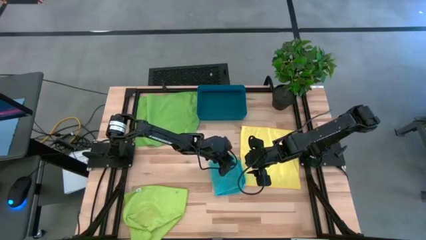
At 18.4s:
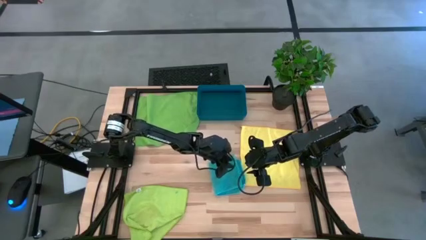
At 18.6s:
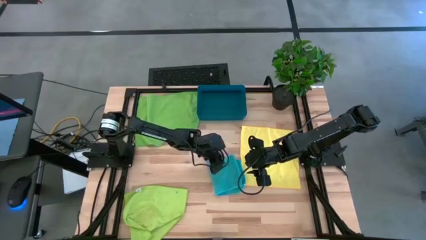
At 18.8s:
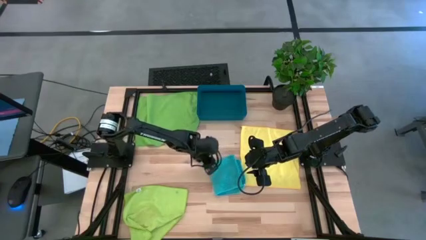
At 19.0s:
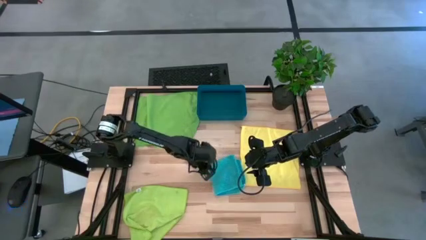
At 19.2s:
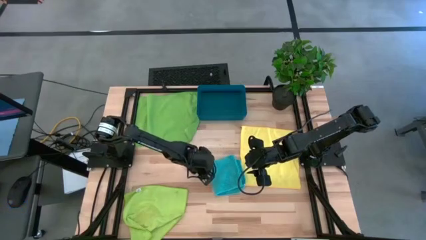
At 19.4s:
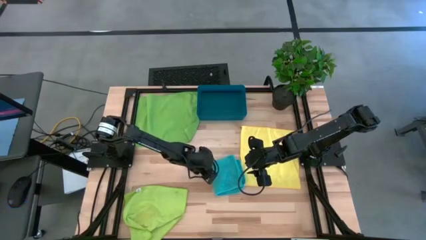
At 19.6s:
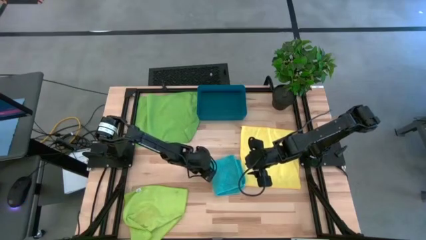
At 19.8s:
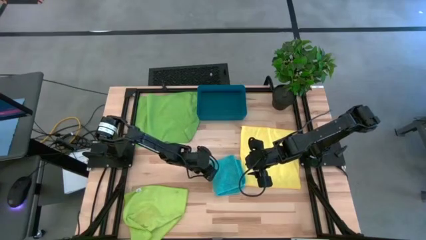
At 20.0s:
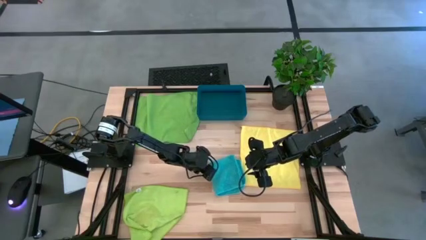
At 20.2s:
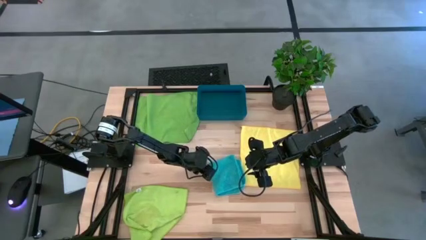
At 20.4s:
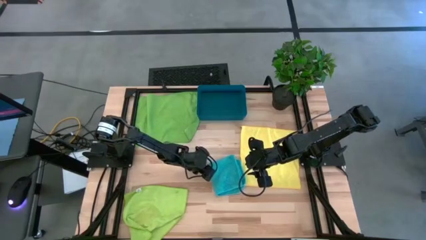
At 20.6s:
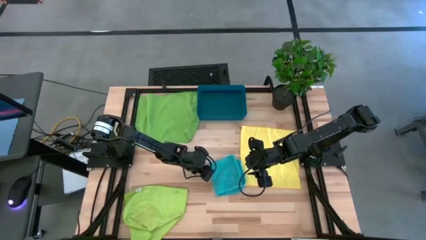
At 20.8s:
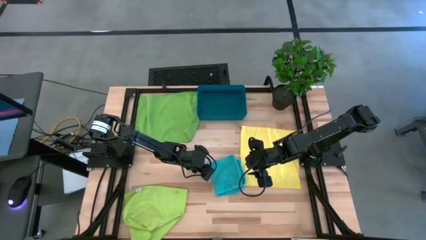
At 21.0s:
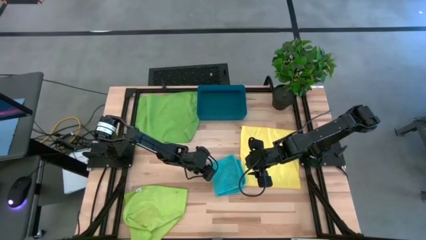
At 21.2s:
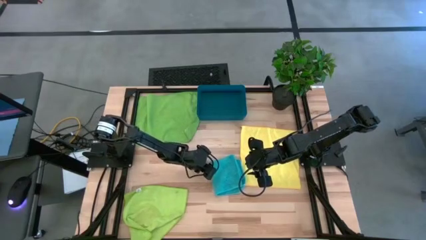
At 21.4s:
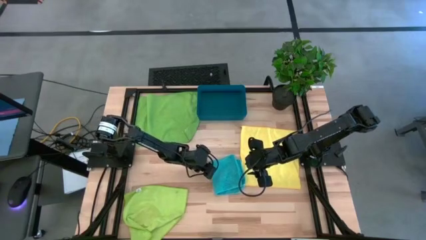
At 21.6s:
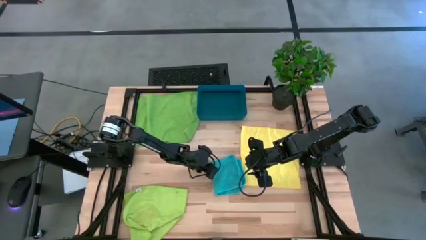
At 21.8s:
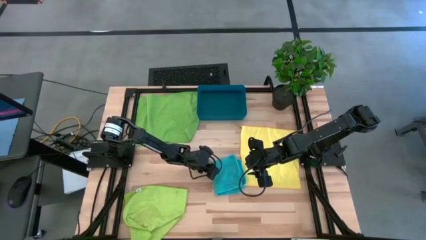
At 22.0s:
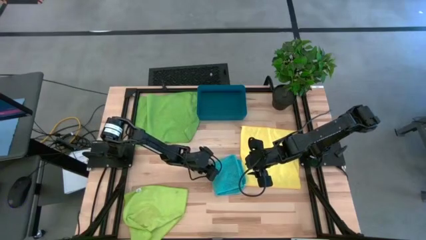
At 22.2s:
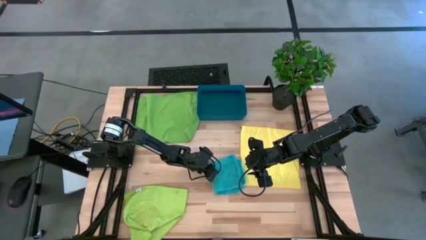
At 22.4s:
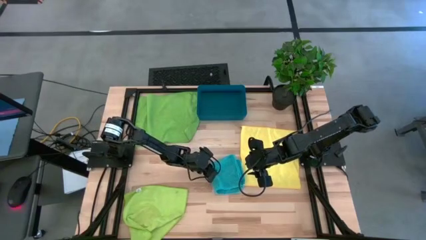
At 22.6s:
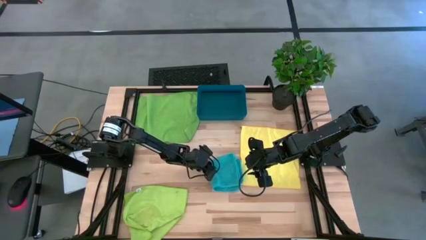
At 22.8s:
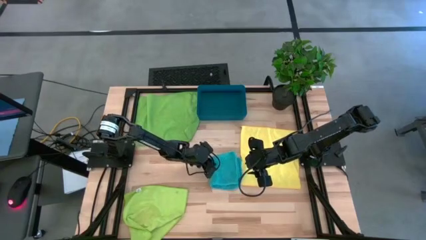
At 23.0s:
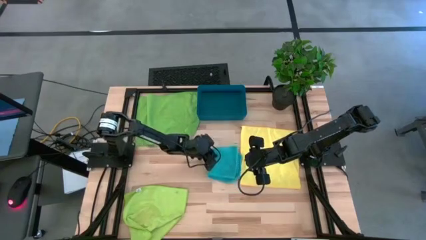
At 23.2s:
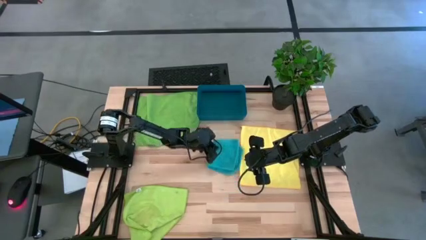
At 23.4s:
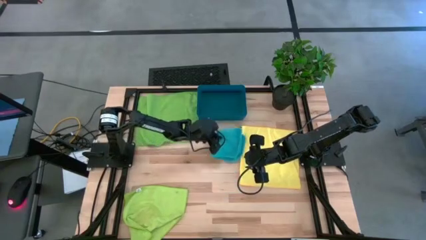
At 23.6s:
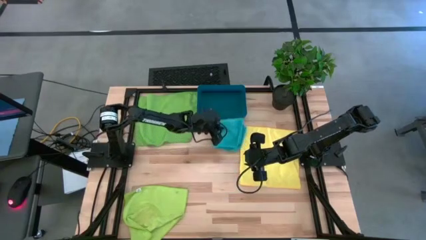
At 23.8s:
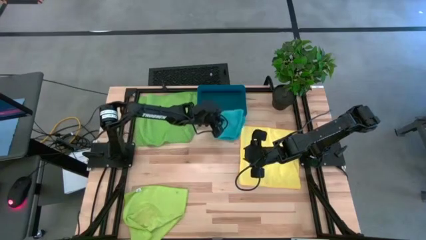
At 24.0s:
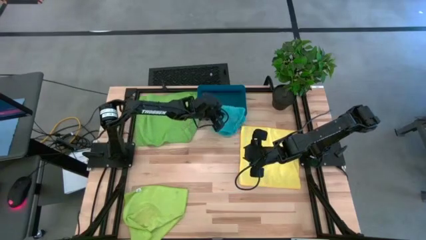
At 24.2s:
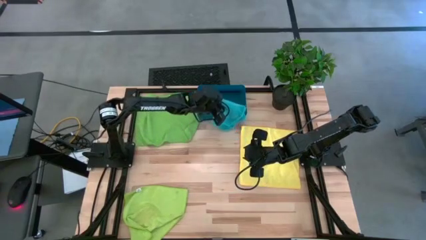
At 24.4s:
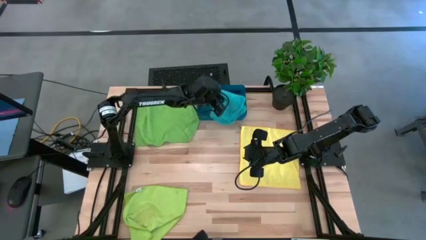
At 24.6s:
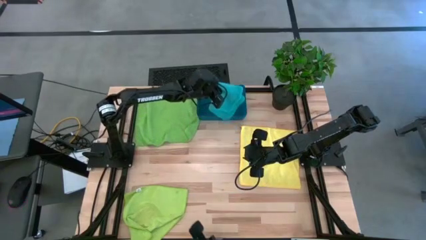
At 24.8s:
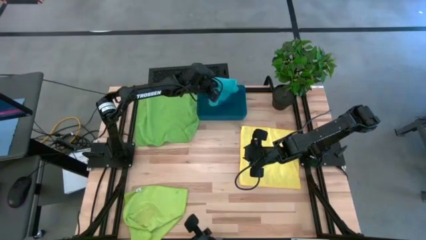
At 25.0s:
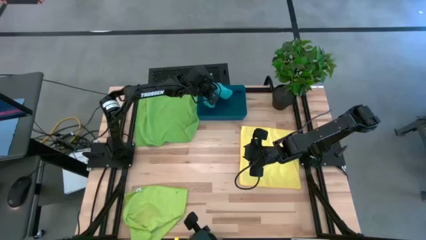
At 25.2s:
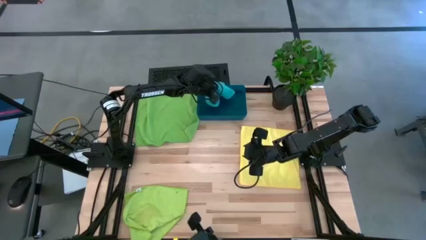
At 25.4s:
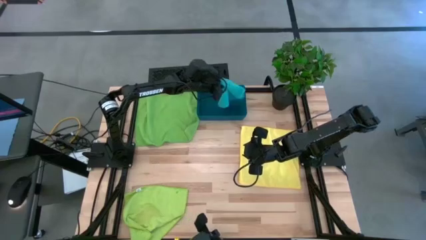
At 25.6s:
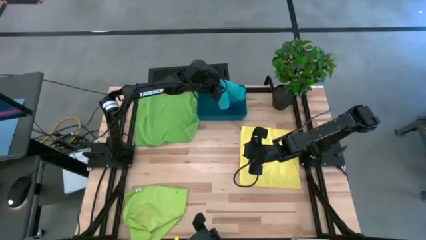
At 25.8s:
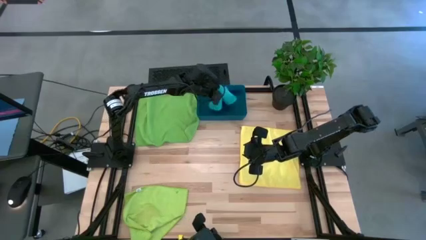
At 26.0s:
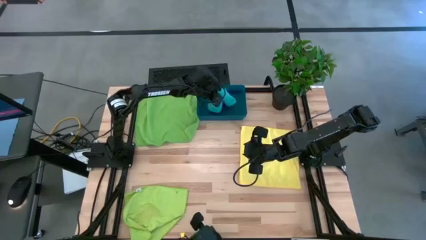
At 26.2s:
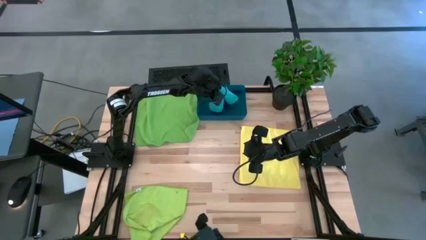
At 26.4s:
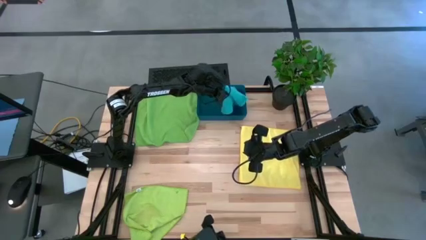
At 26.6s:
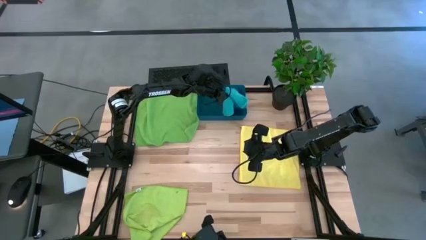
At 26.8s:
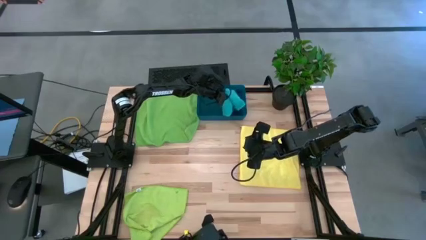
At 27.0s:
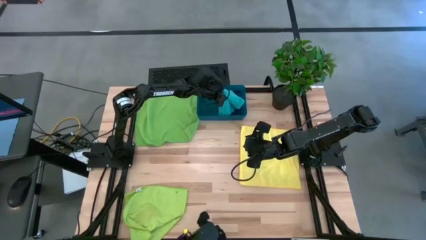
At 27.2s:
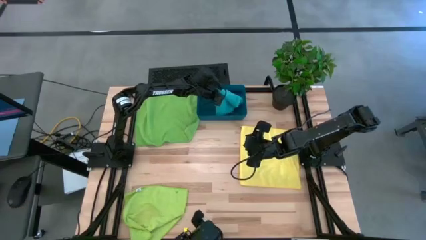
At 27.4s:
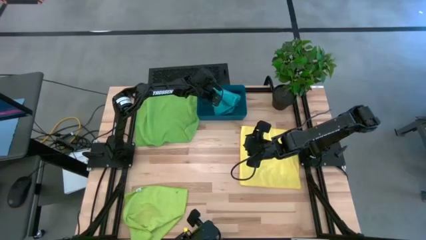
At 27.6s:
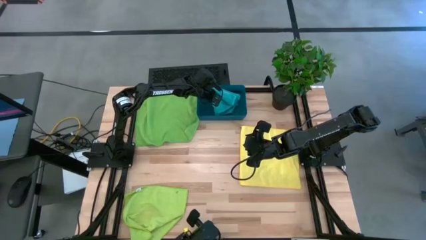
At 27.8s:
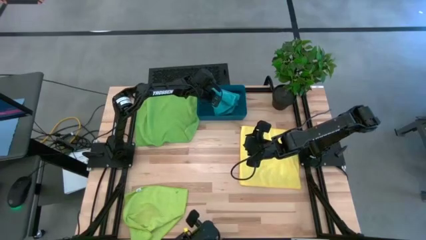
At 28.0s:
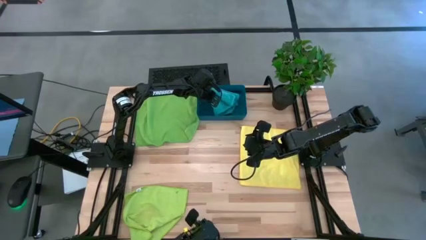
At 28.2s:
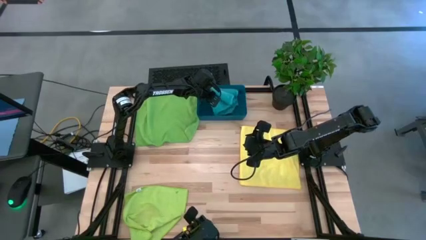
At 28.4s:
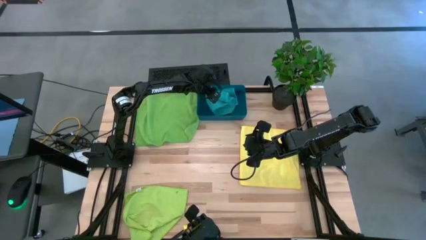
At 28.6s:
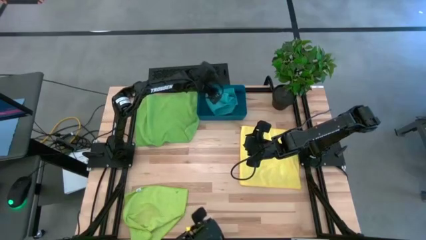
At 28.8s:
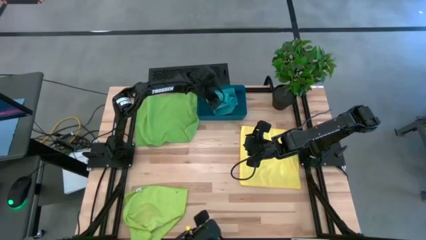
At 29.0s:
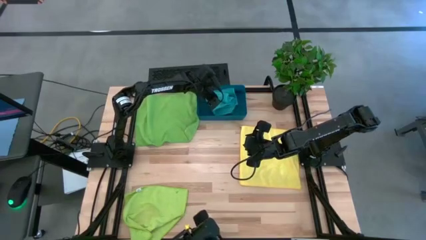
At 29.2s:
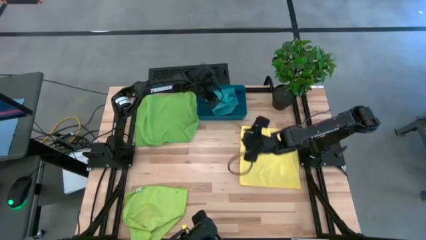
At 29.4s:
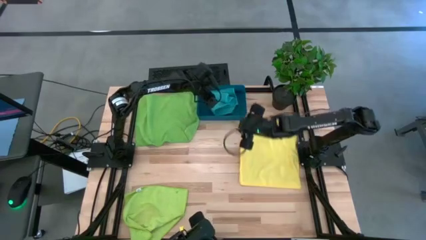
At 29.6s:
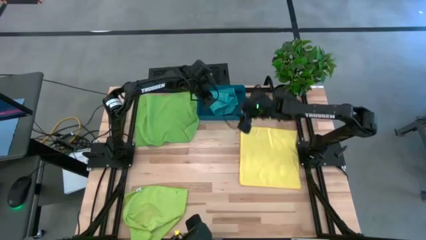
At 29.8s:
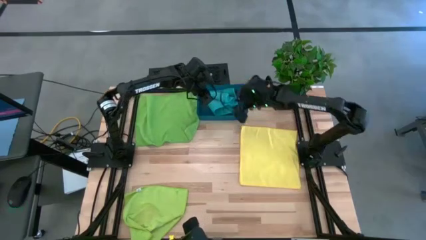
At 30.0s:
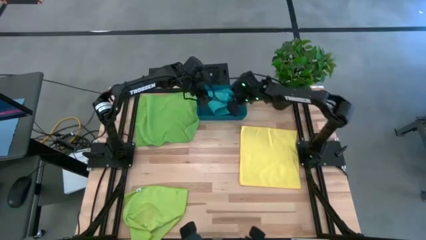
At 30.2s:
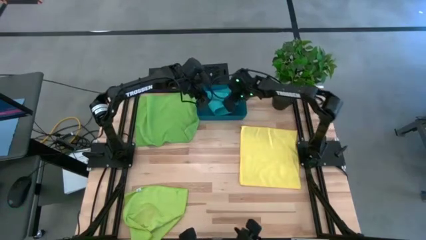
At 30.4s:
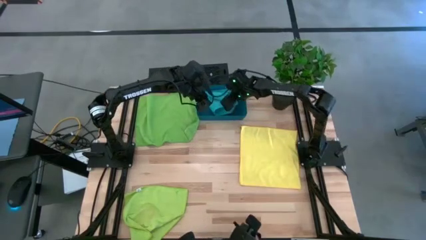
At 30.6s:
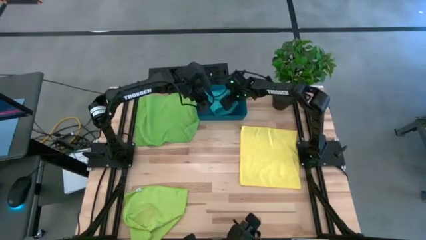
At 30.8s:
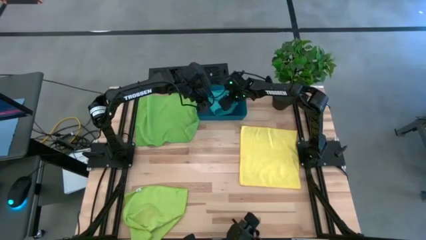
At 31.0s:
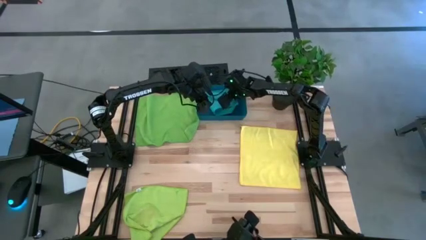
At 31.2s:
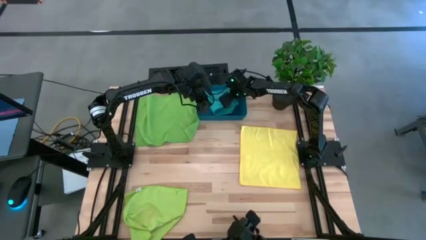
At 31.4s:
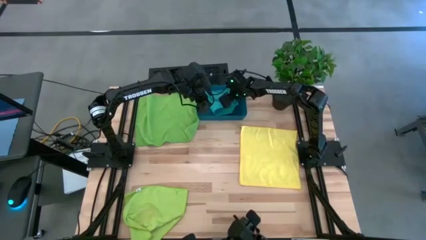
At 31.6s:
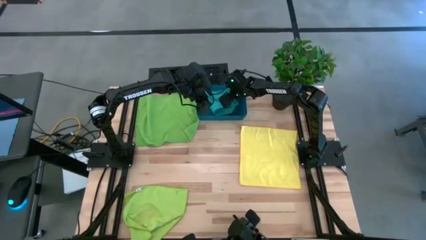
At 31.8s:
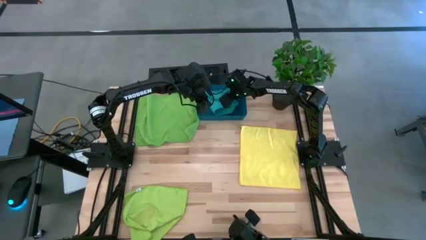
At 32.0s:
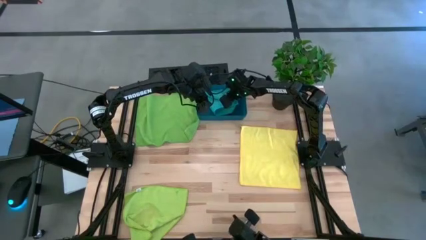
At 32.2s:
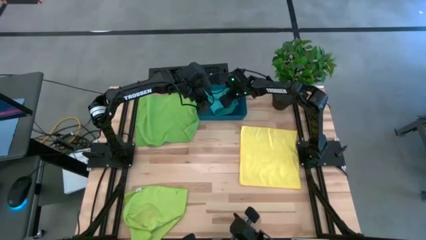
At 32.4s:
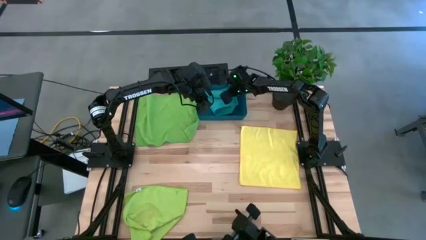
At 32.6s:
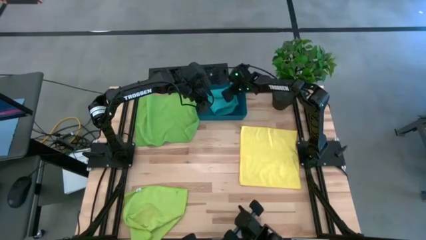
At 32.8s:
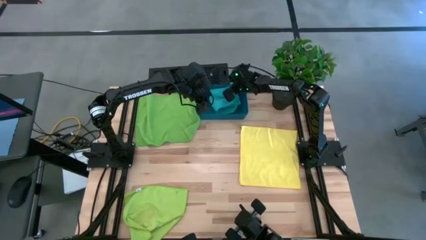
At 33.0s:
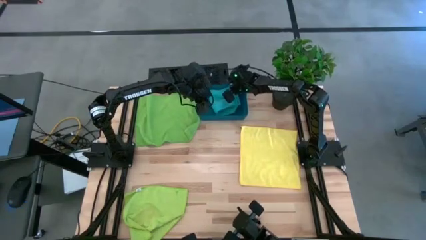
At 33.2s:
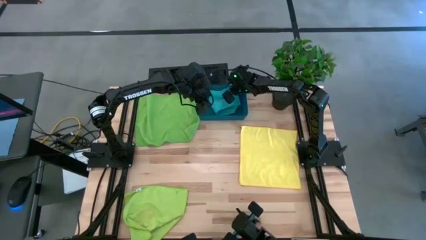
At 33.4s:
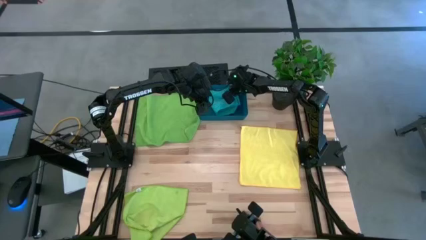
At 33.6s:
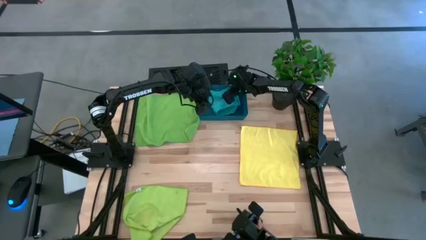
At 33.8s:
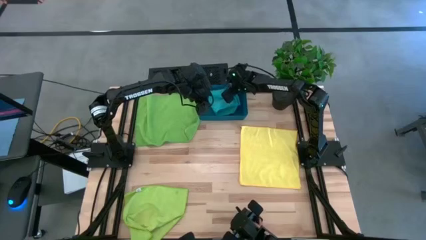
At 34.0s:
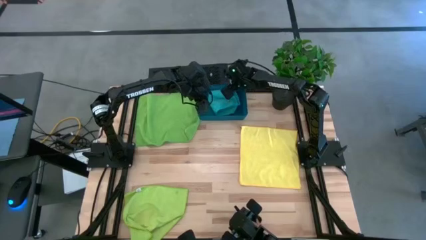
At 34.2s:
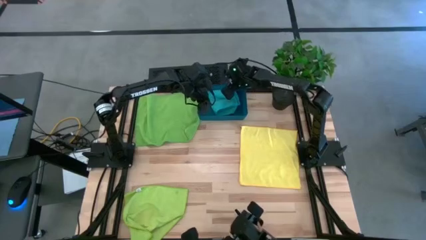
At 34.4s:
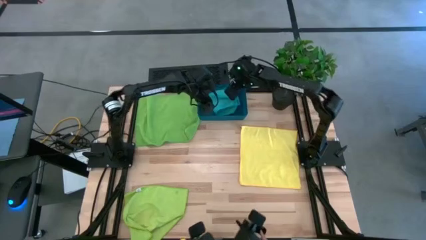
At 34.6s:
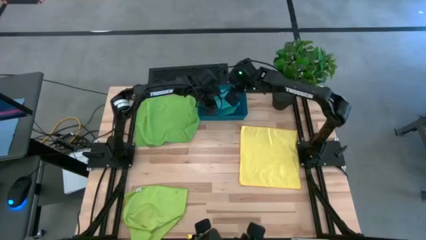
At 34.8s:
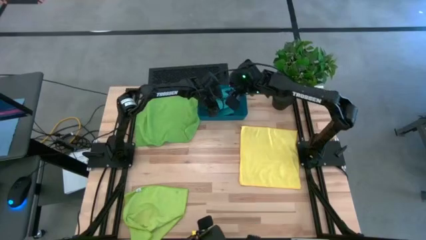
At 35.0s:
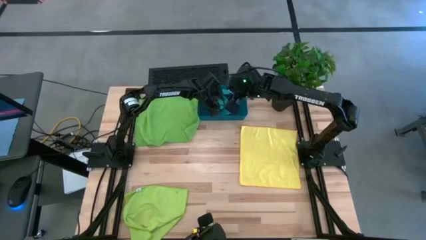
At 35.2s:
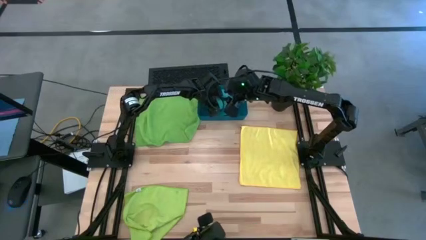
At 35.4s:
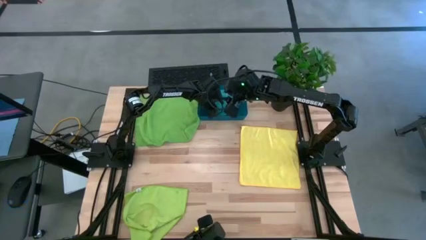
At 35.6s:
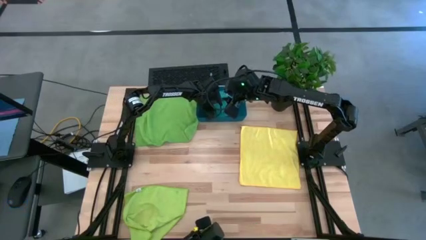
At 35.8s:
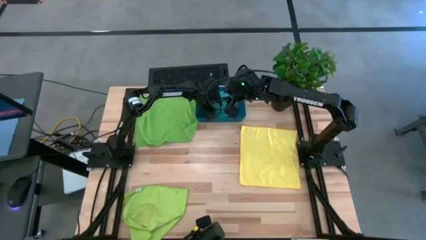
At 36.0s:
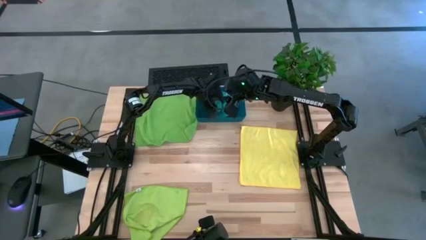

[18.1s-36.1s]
Task: Fold microfiber towels
Put the folded blue microfiber cloth into the blue bin
